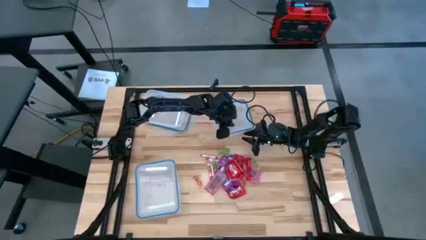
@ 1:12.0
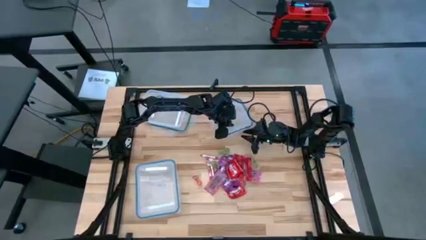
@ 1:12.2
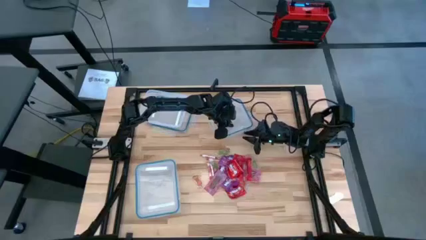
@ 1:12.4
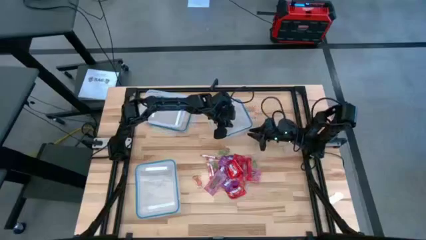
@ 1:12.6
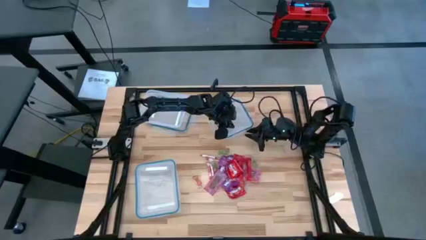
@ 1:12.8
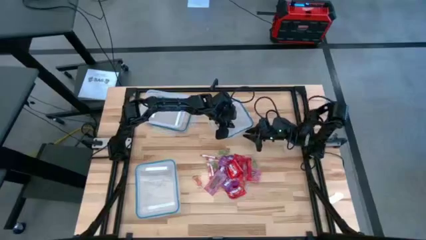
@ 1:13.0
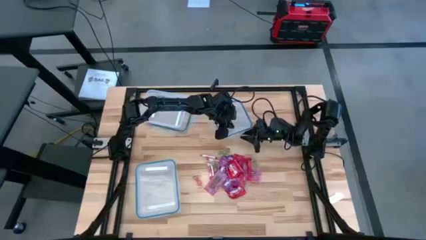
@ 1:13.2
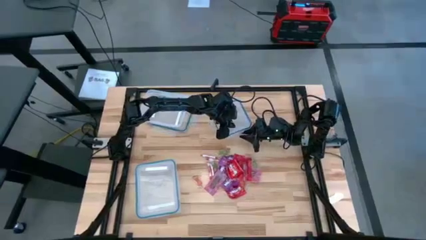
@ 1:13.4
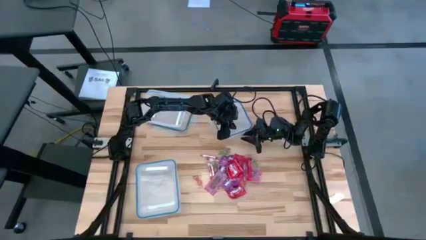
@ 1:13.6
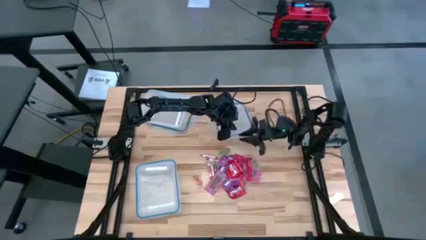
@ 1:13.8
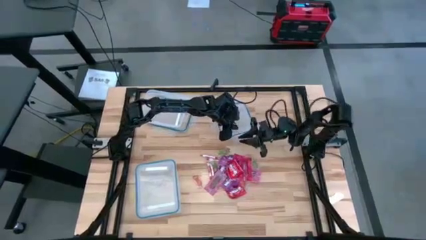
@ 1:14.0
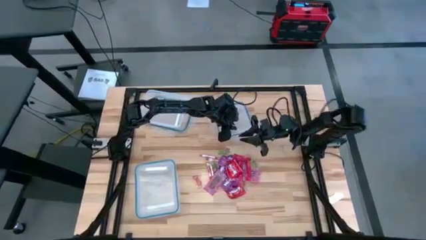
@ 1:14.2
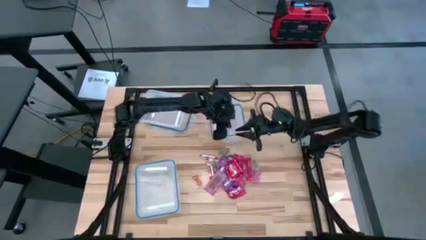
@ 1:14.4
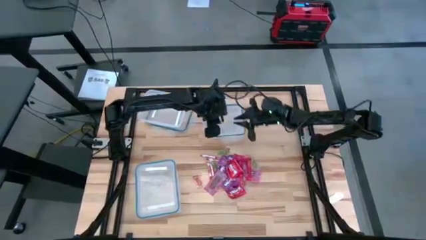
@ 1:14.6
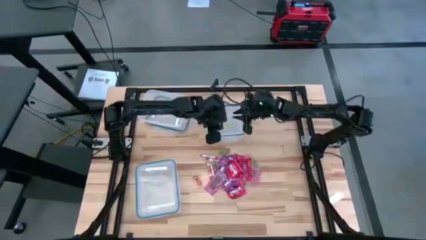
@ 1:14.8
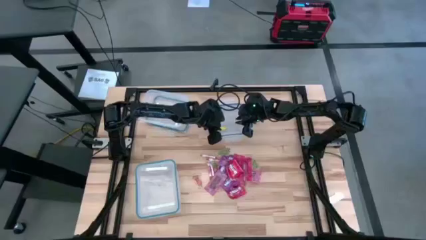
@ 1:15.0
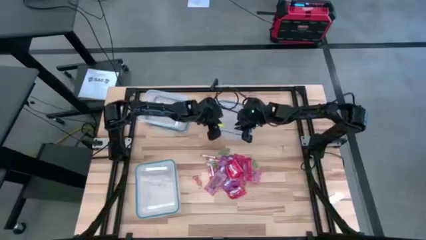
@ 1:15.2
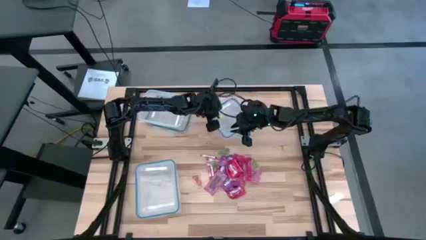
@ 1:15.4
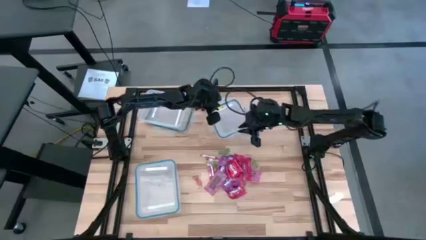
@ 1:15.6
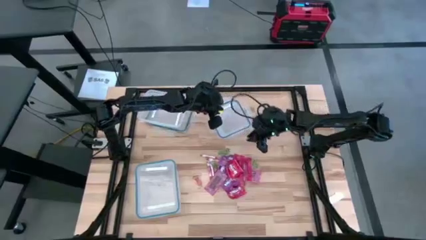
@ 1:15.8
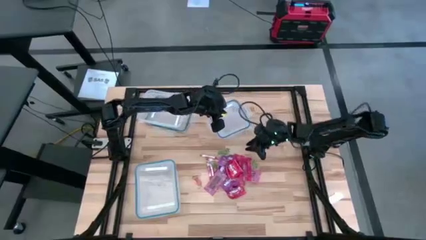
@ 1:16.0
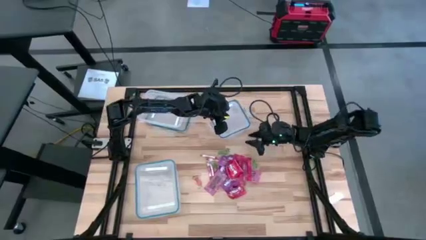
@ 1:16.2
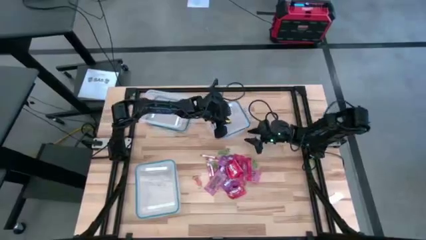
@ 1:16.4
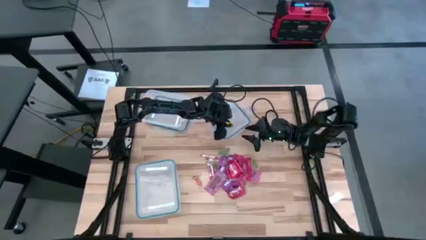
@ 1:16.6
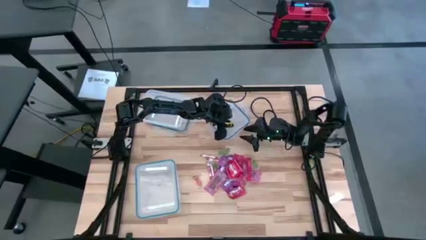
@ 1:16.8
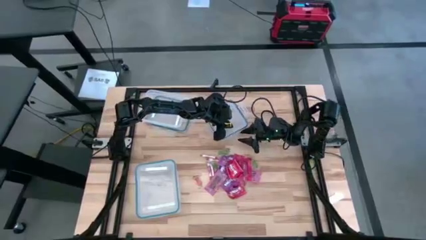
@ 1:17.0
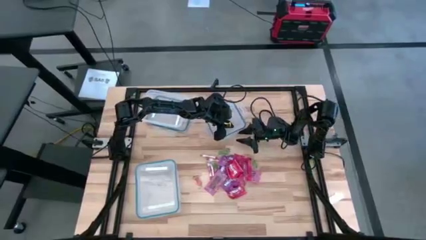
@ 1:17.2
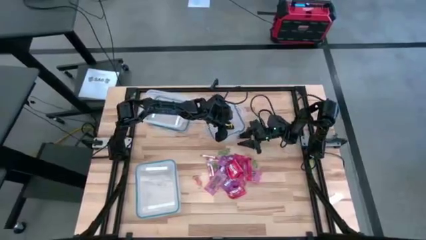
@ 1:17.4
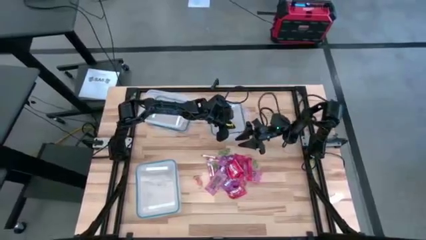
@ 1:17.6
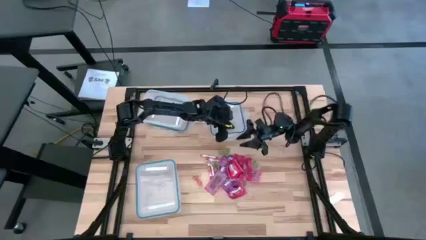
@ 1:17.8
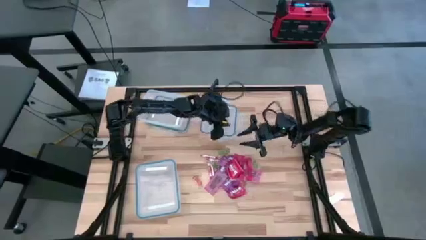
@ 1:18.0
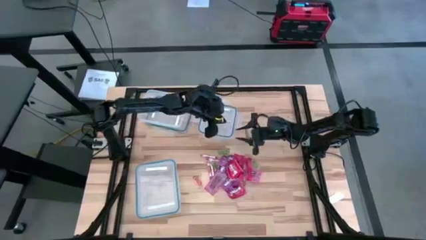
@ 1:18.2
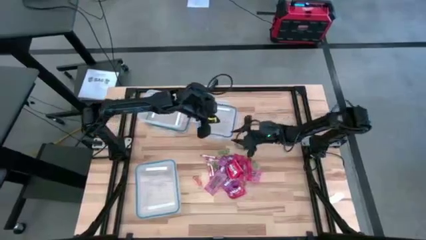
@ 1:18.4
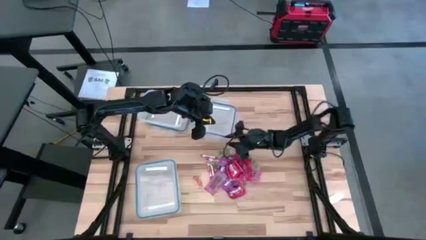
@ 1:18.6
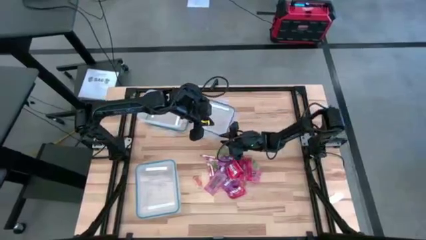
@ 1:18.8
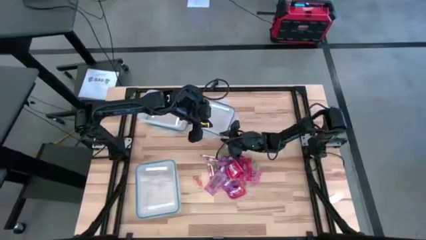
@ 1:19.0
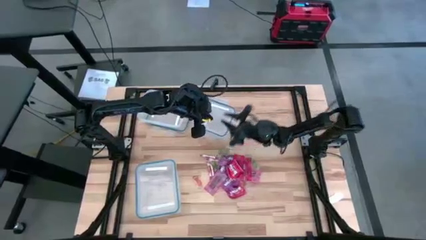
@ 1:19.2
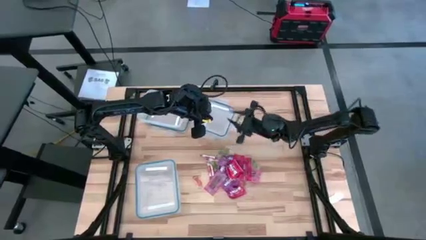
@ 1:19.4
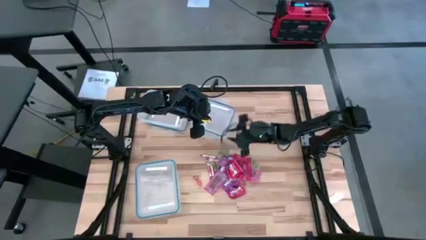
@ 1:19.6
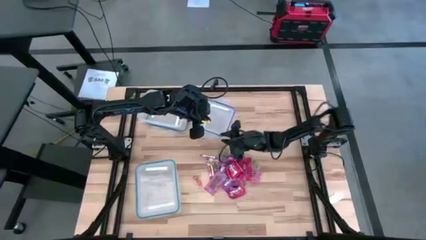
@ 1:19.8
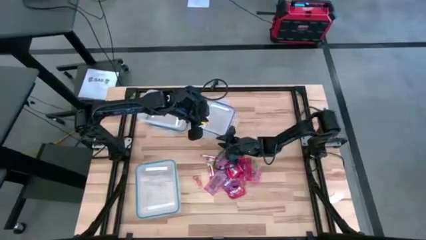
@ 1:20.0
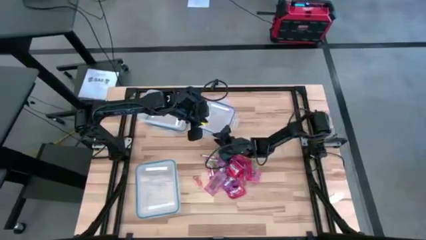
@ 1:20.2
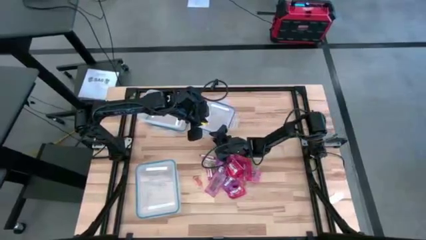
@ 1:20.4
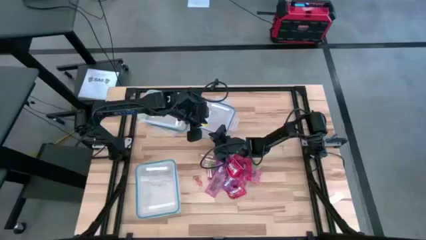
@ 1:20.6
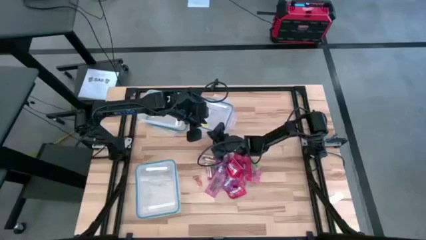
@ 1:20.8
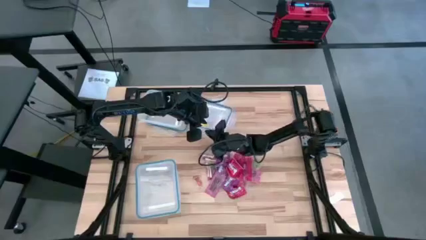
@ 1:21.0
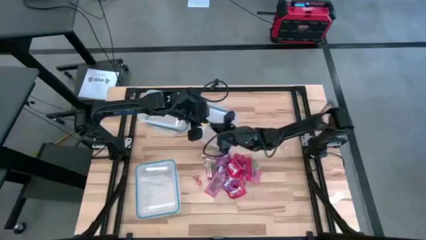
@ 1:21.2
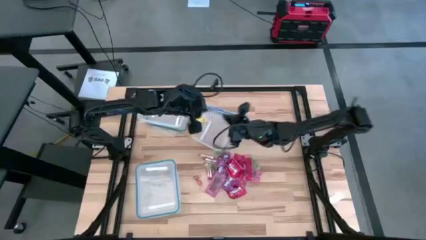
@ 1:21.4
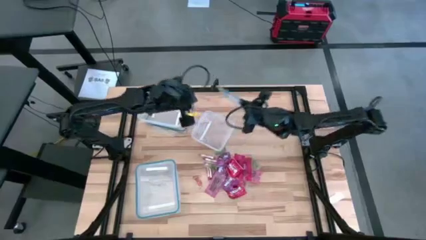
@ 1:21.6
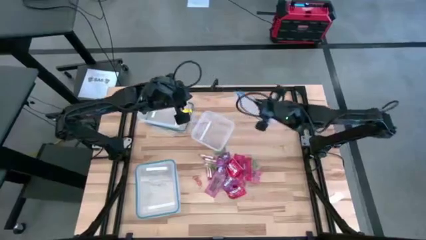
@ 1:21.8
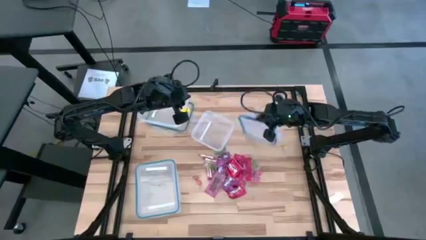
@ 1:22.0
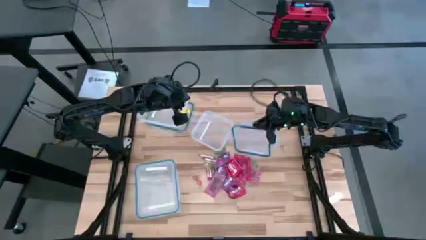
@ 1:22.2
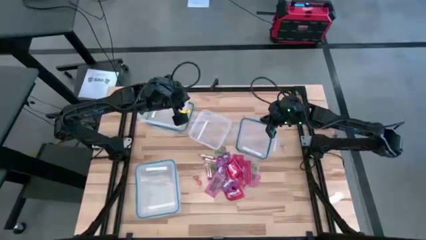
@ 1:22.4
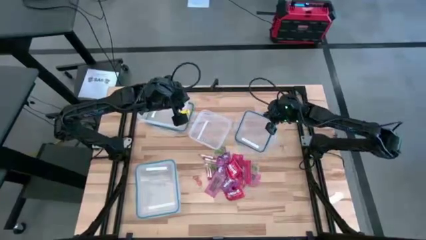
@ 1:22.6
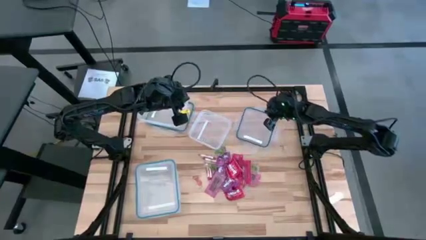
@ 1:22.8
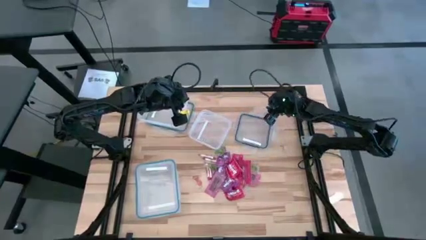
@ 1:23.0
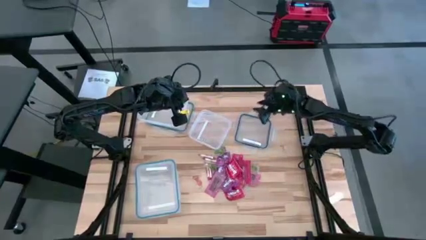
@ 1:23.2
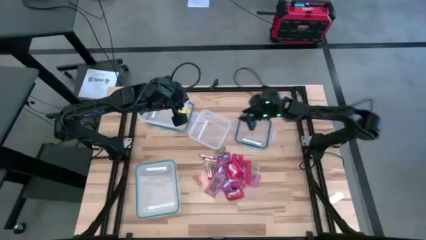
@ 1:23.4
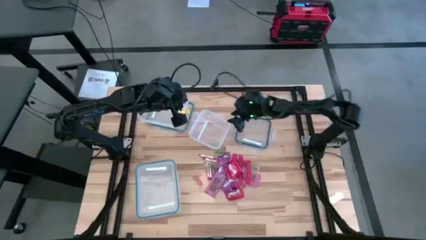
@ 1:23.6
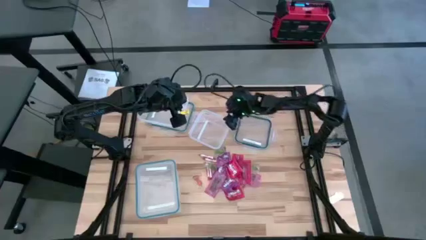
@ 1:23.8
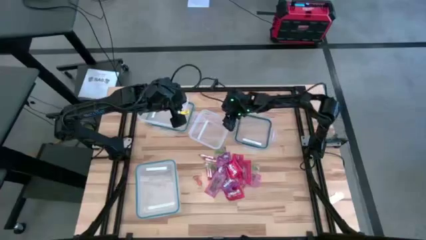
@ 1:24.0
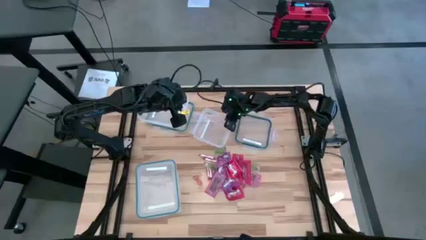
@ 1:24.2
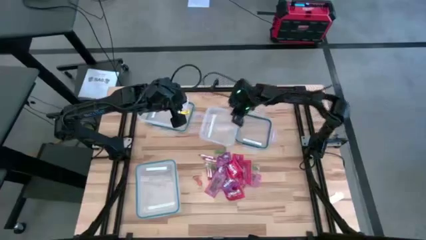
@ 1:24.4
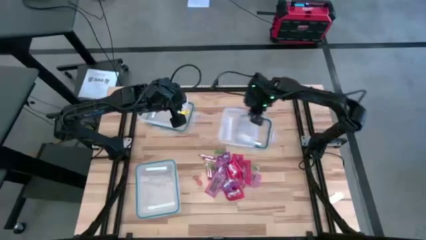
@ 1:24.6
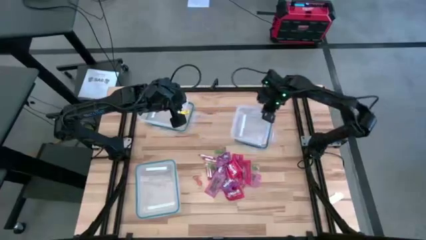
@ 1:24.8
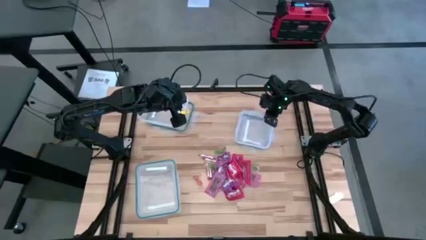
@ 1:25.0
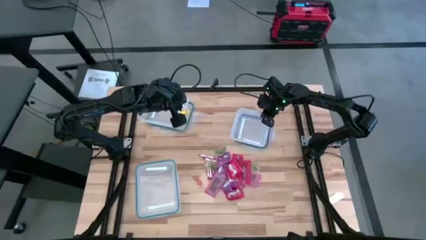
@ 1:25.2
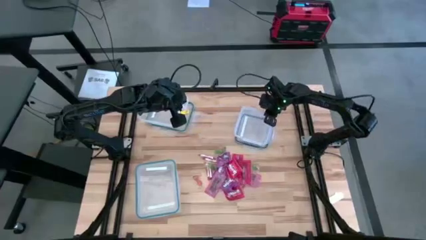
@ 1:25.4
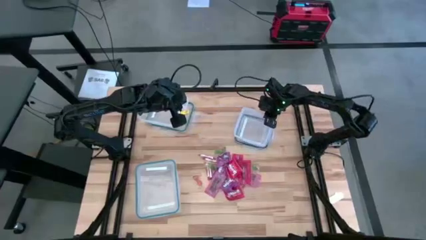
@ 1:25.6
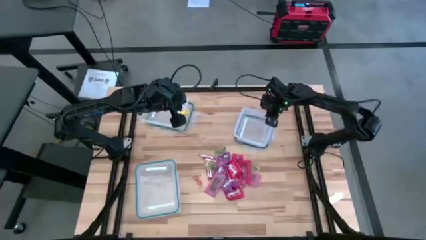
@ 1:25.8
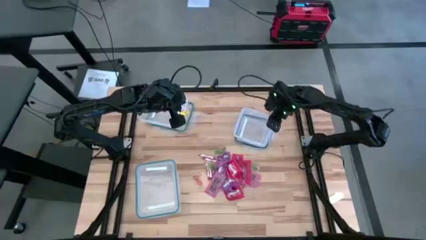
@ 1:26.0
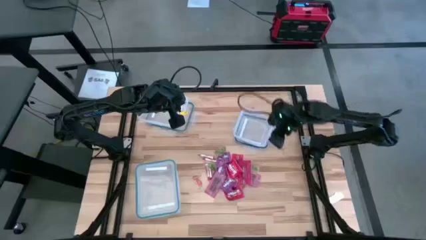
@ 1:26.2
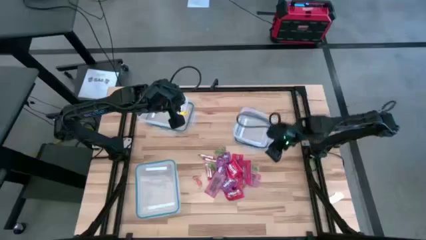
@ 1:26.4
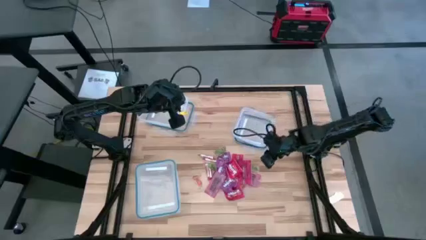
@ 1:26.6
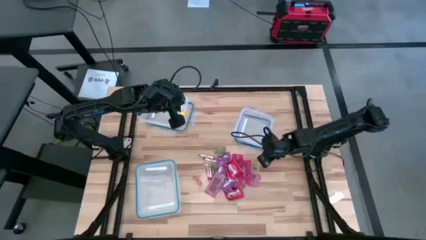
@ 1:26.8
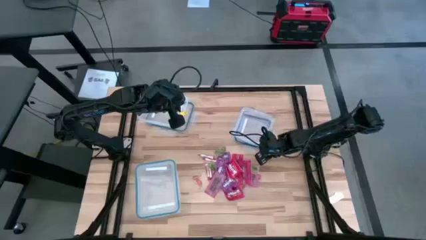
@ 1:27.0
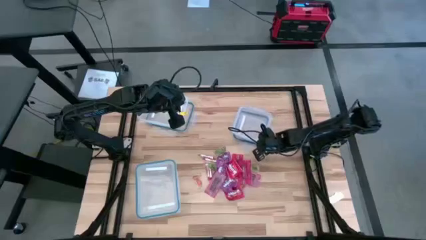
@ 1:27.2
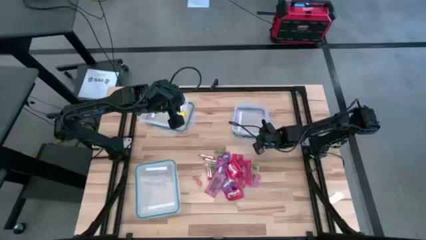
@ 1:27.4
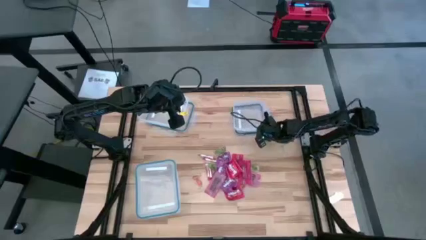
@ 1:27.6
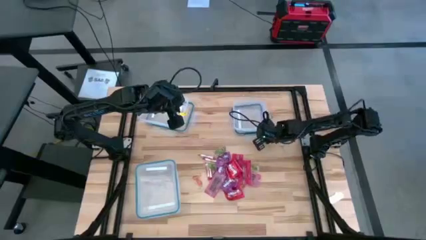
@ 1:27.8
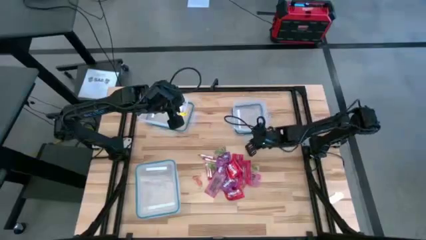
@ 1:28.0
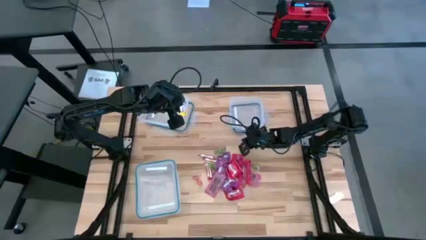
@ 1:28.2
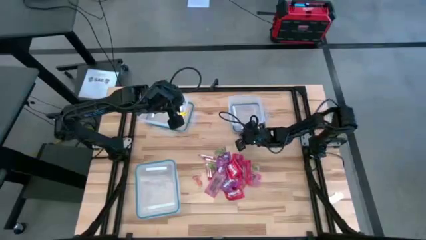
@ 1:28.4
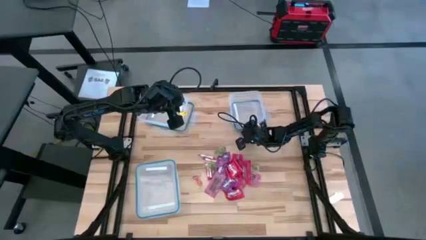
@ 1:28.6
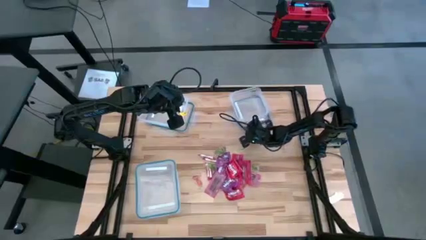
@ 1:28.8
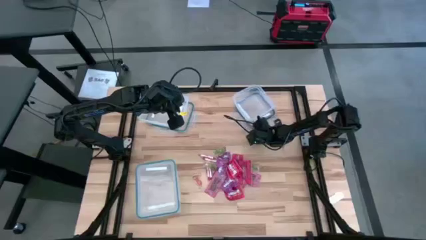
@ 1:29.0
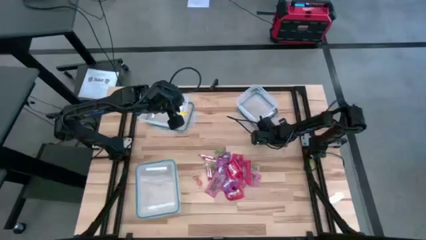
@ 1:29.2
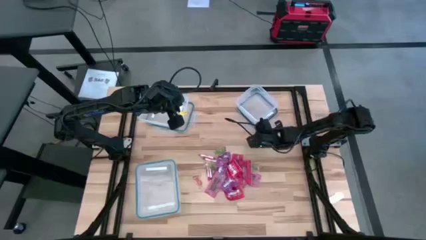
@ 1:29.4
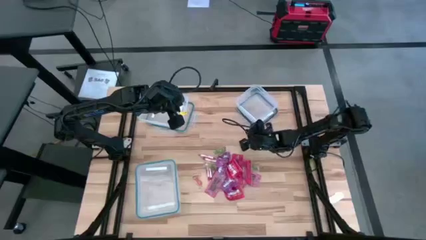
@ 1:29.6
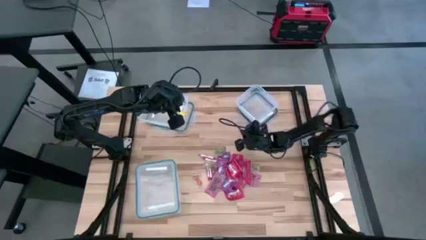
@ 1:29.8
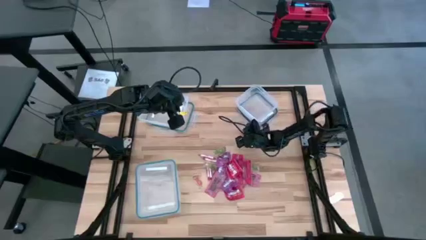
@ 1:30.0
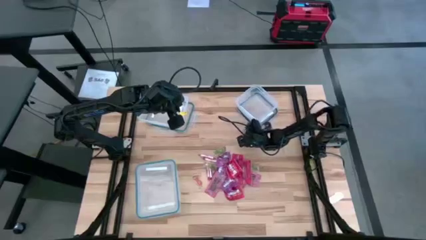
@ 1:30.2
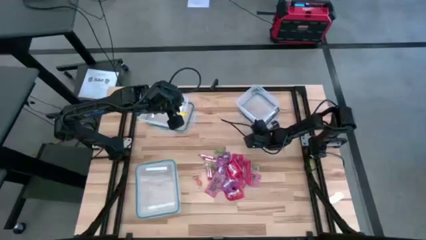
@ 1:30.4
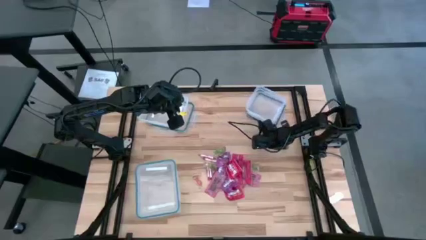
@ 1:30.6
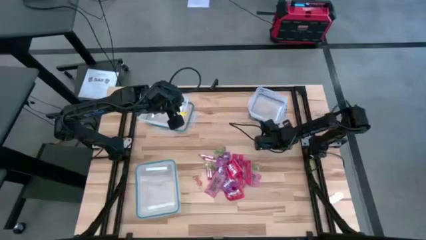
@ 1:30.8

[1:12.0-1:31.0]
Task: Sort candy
Open the top right transparent bin
